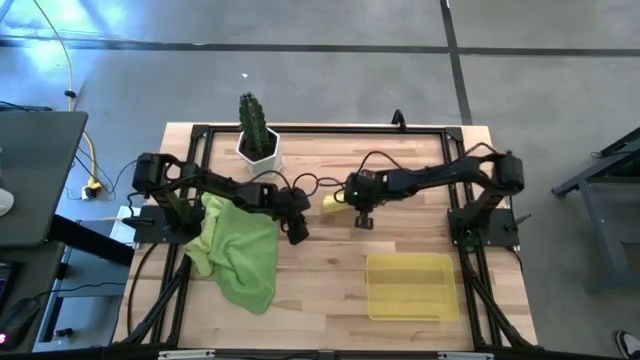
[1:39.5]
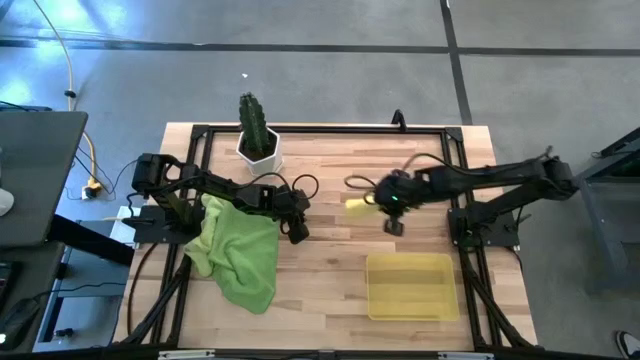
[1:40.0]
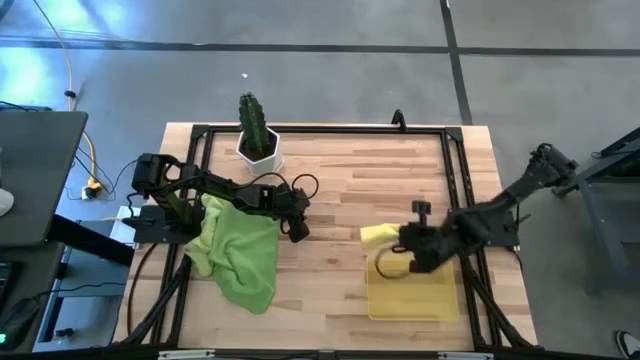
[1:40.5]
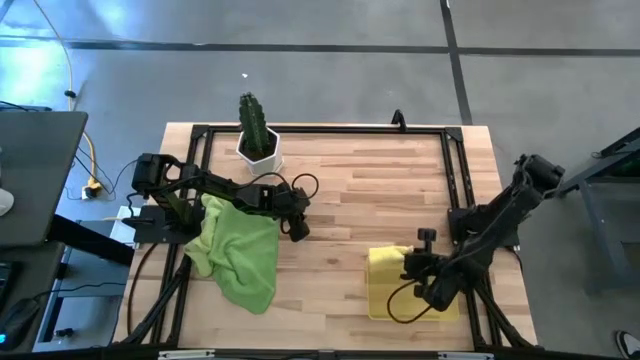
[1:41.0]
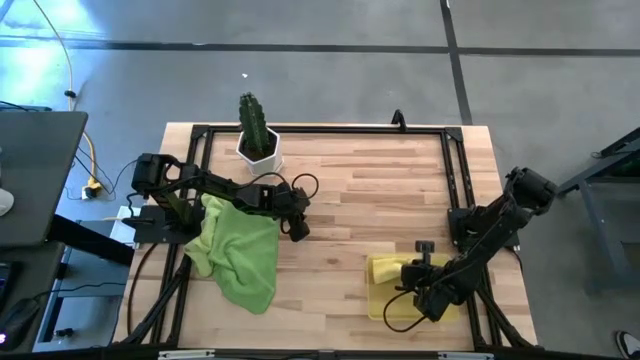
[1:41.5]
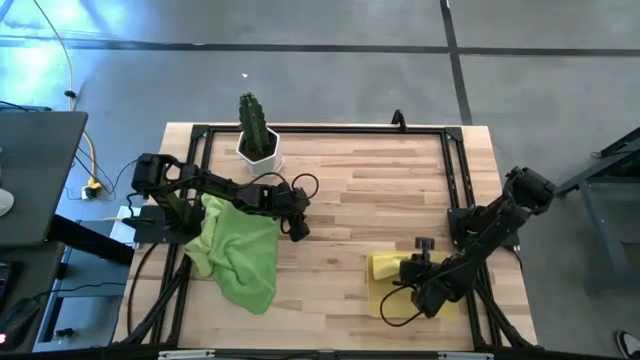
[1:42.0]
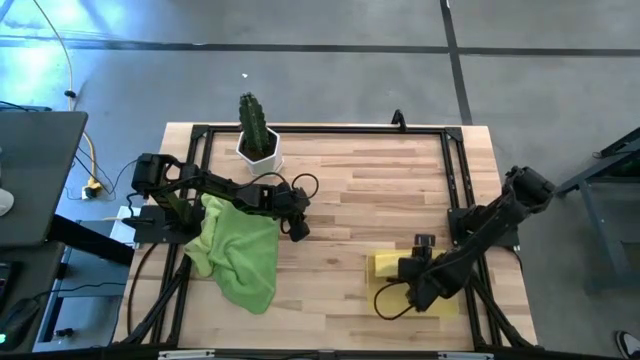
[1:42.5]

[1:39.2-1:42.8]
Task: Roll microfiber towels into tight, uniform cylinder then place into a basket
Put the rolled yellow towel into the yellow bin

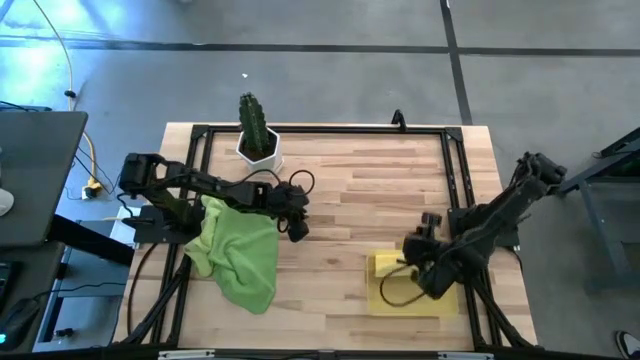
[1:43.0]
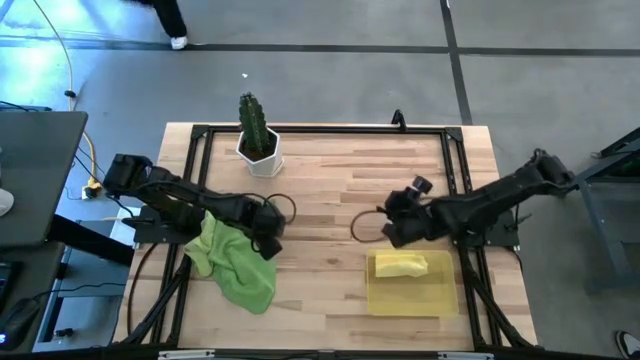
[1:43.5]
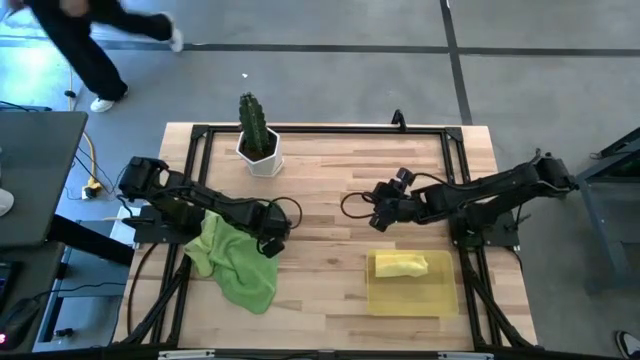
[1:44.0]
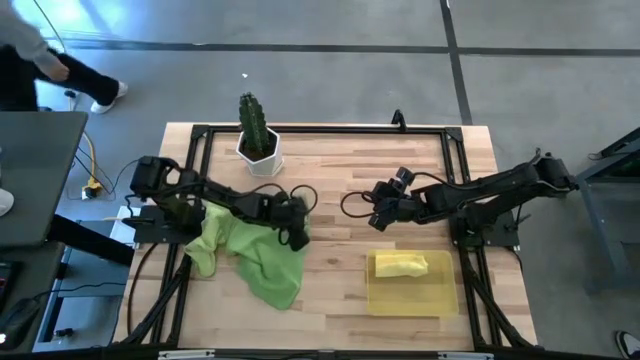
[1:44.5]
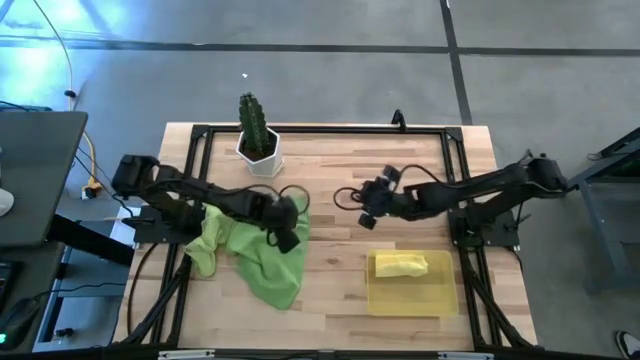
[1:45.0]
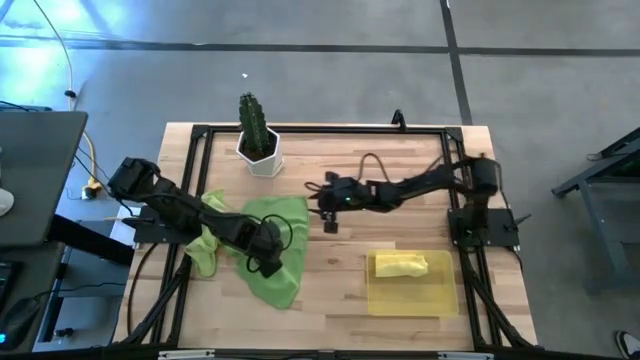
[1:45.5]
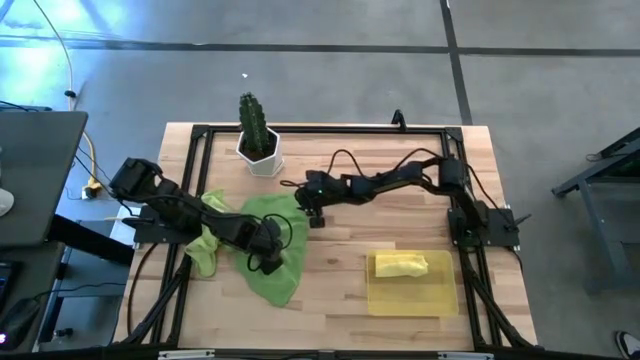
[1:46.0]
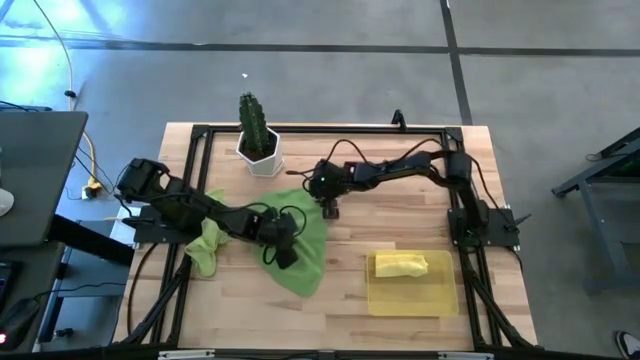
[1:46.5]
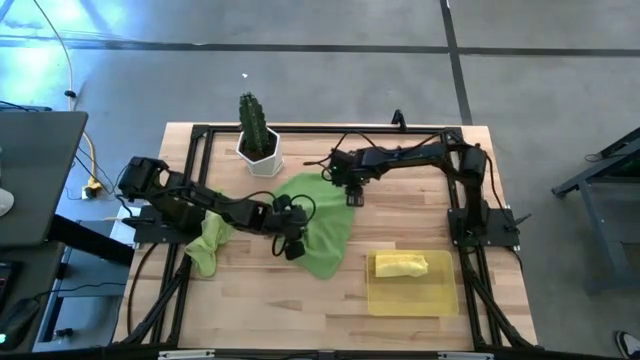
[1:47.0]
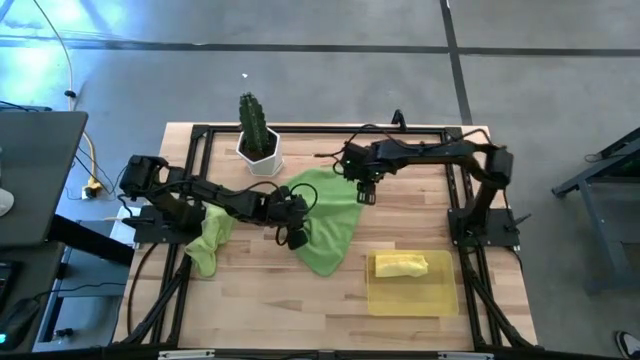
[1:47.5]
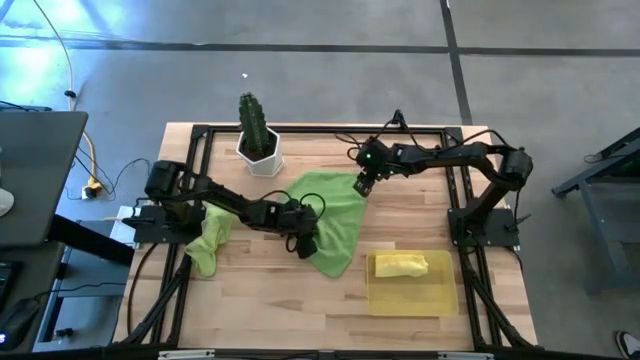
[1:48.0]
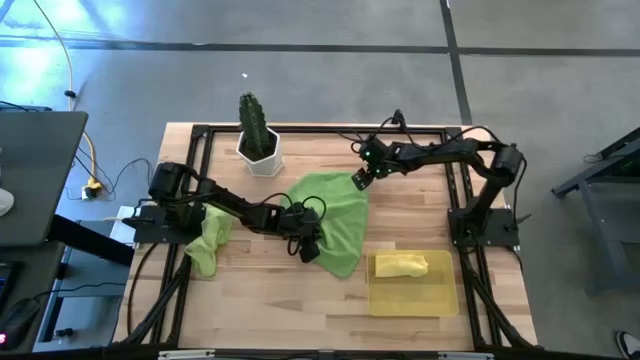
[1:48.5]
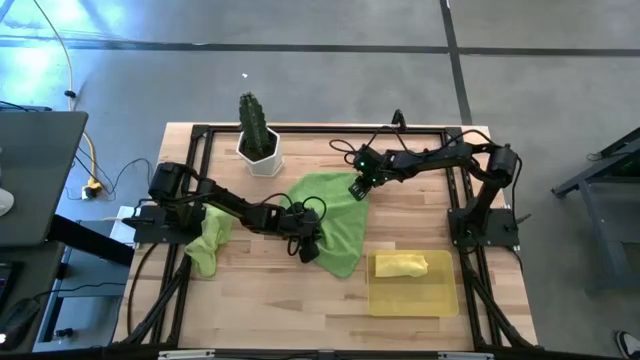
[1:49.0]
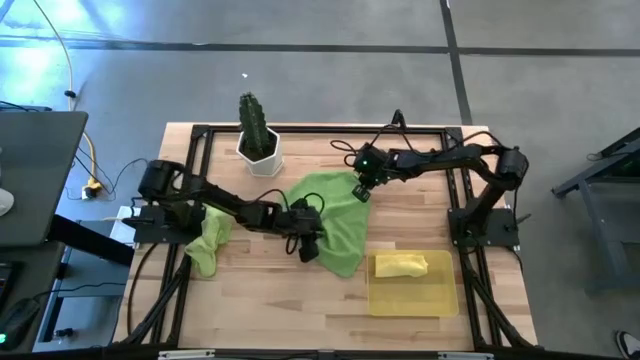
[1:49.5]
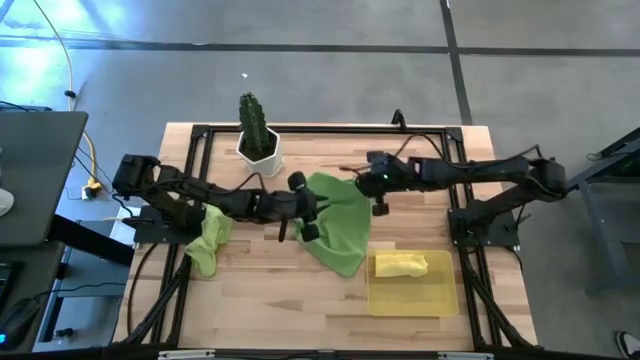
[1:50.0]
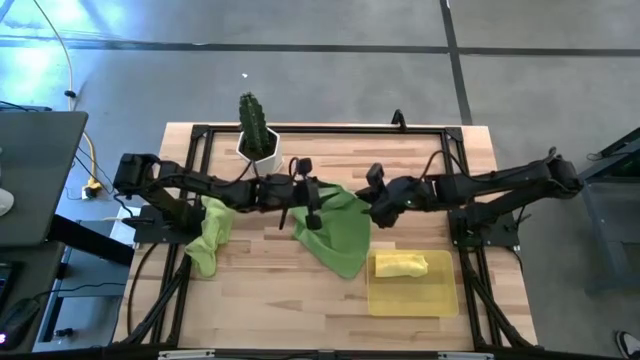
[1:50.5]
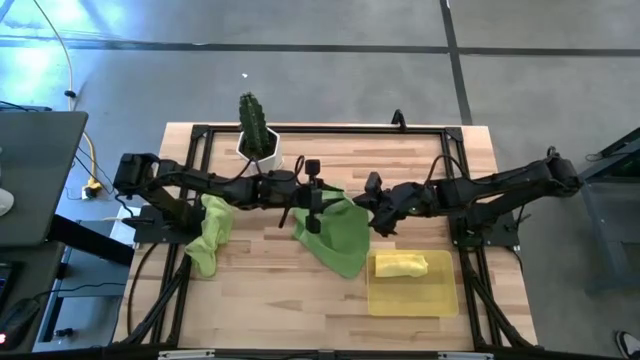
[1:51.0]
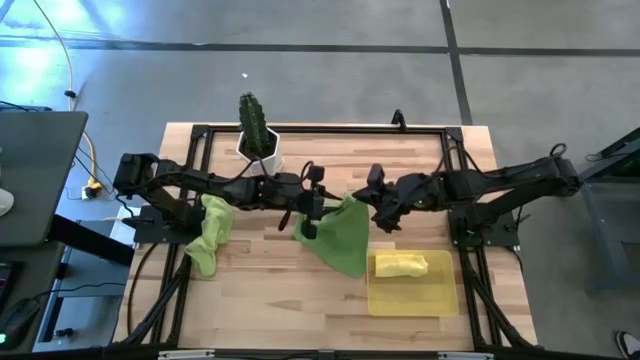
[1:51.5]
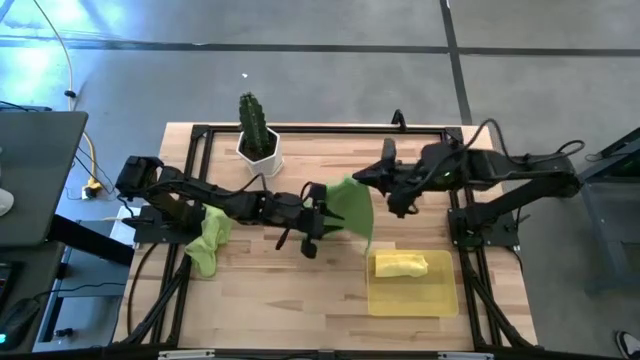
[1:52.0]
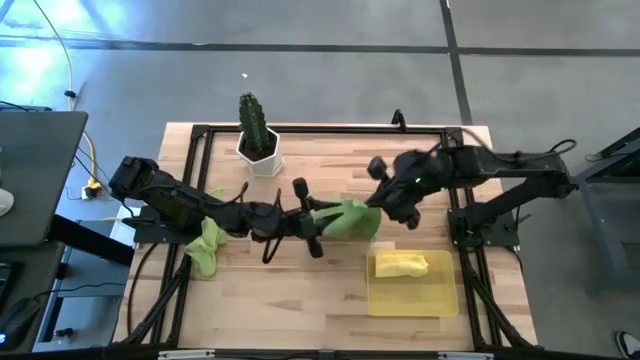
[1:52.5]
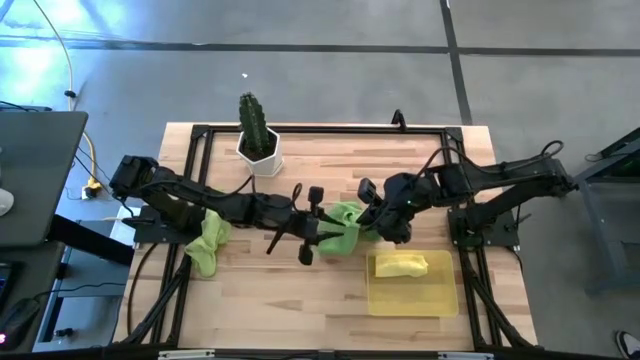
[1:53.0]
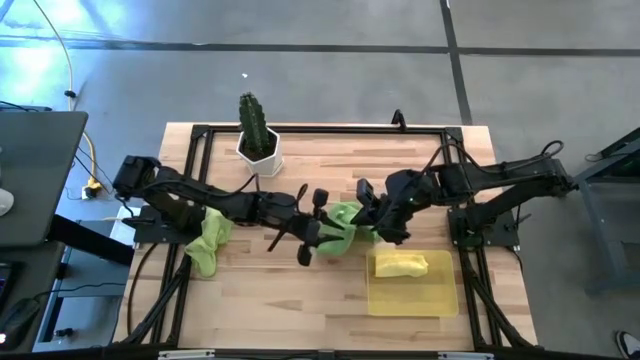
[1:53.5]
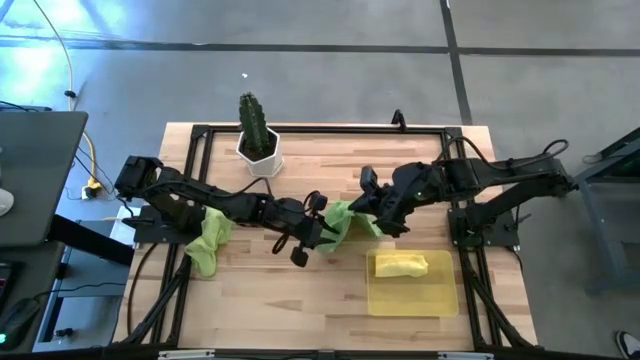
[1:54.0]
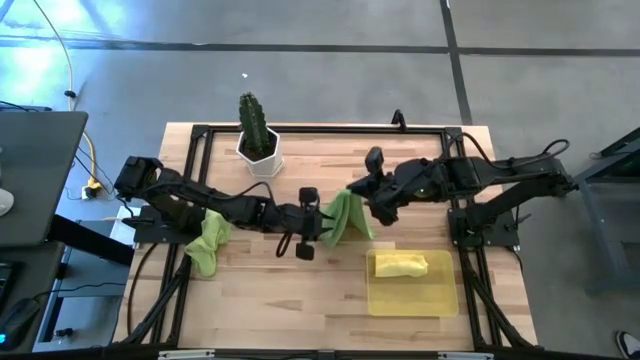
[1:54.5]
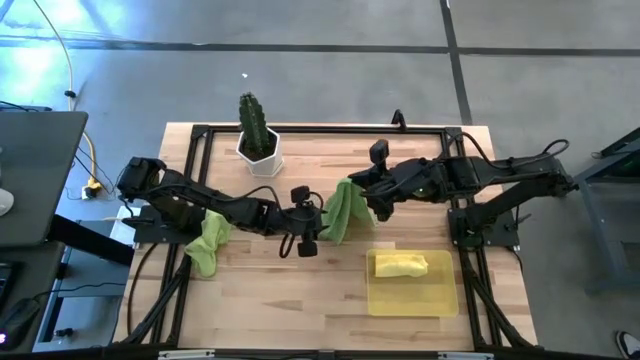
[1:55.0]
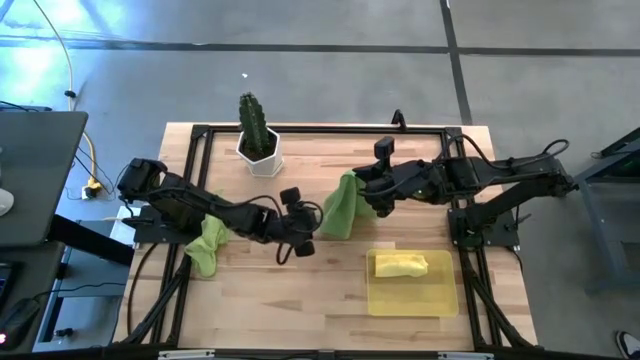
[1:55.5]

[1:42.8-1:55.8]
Fold the green towel

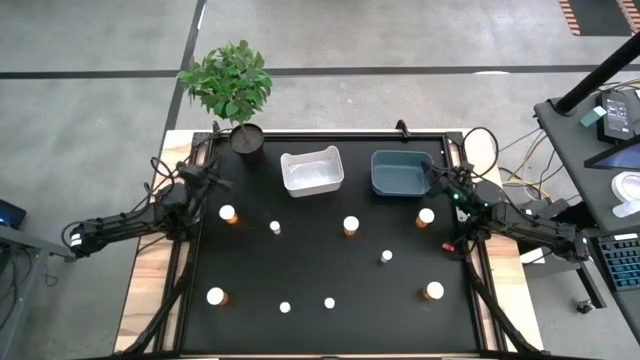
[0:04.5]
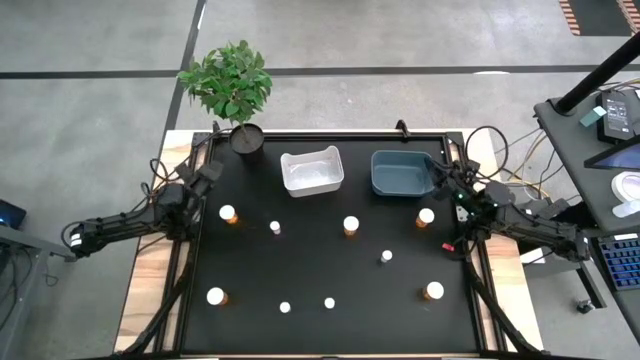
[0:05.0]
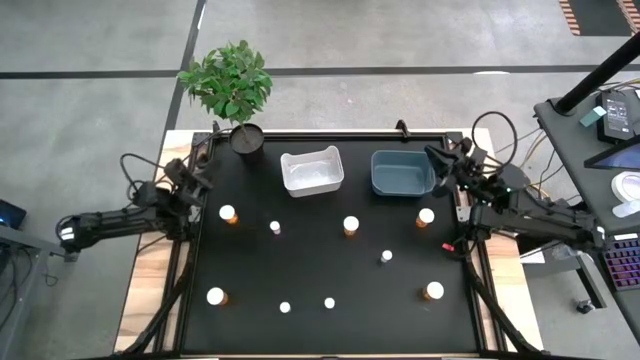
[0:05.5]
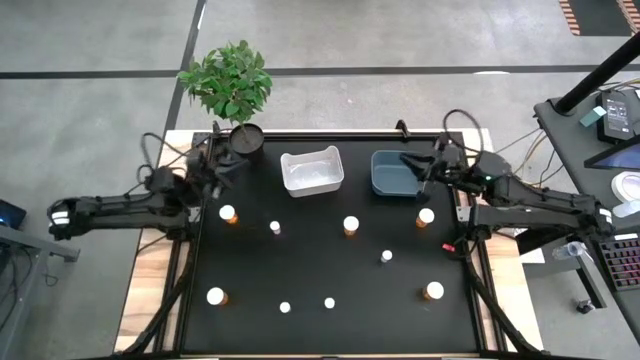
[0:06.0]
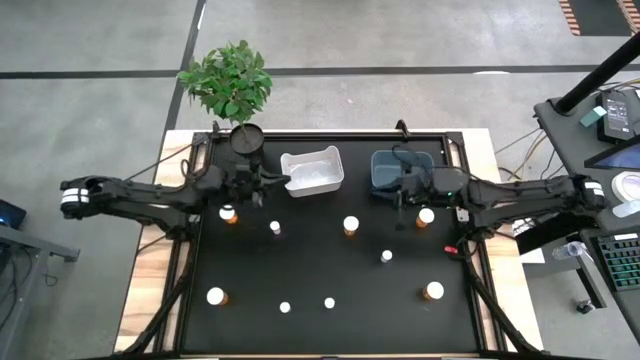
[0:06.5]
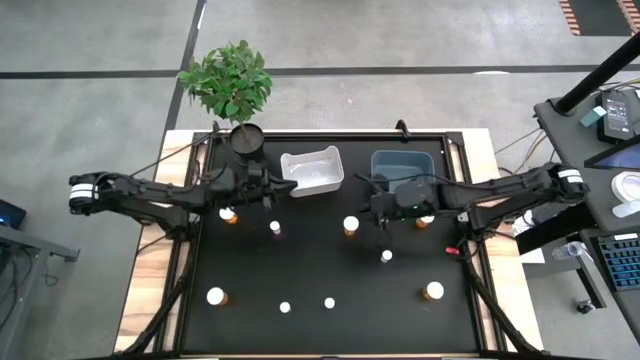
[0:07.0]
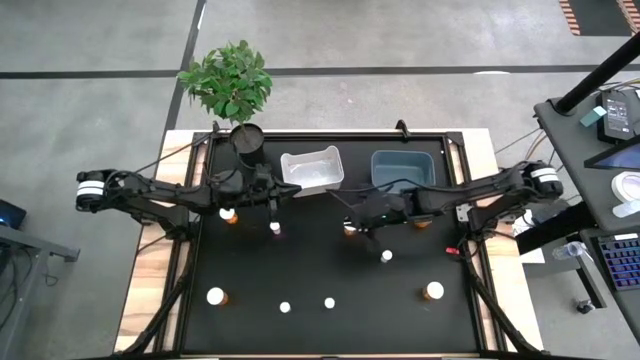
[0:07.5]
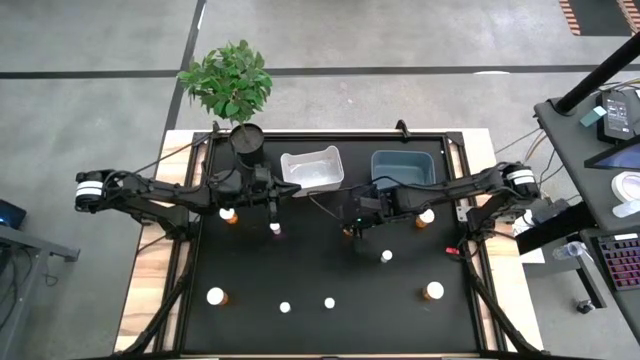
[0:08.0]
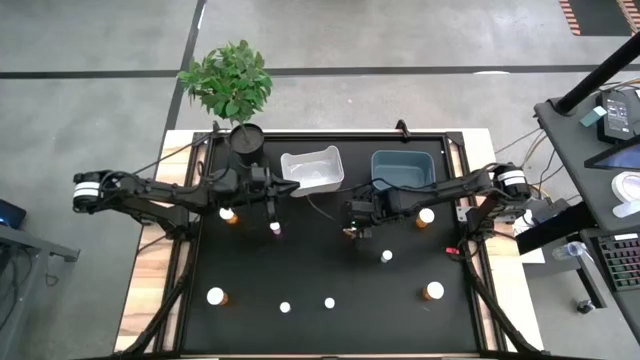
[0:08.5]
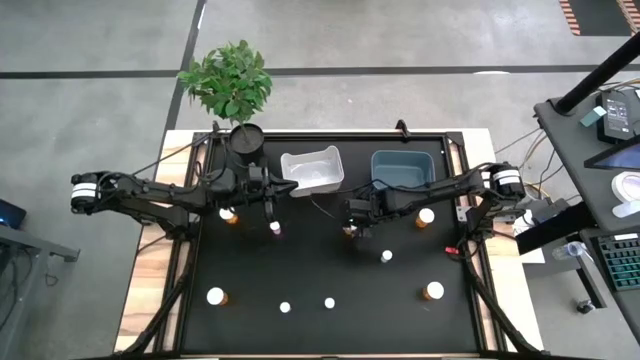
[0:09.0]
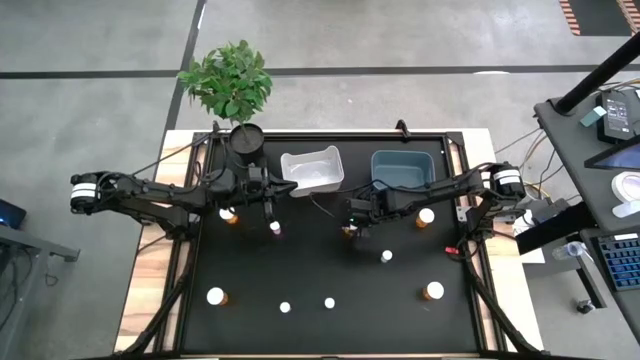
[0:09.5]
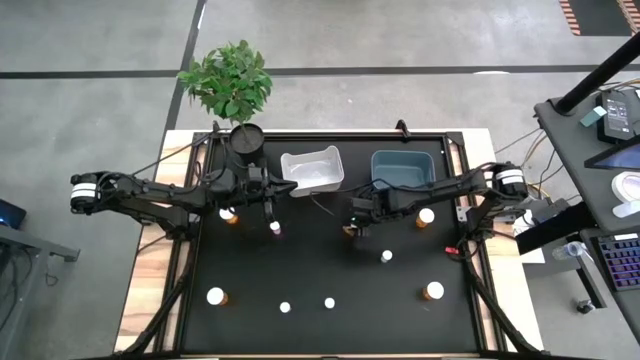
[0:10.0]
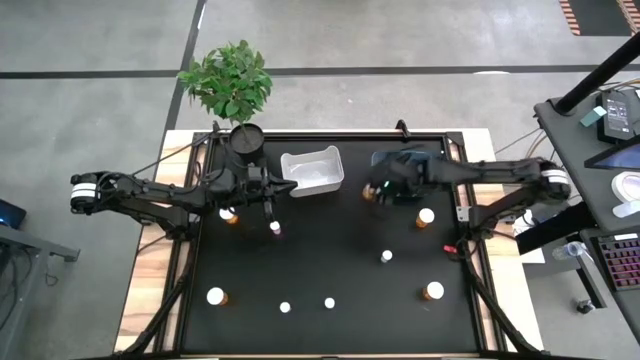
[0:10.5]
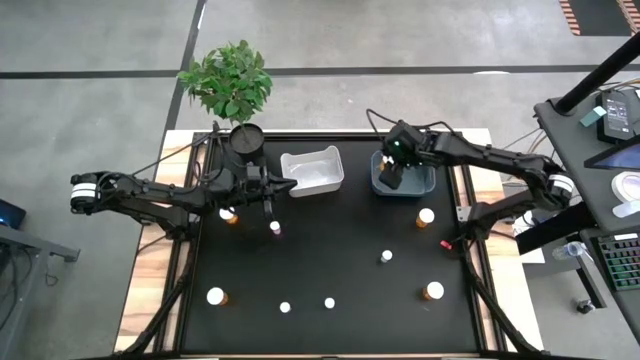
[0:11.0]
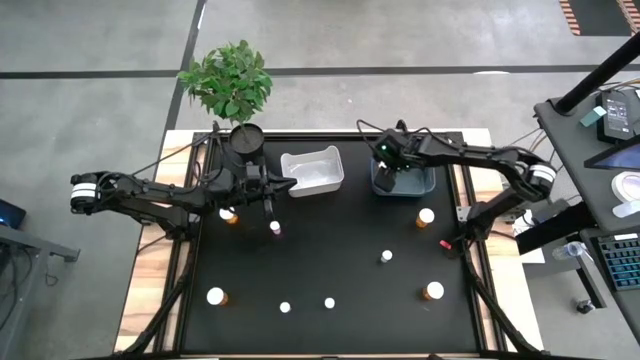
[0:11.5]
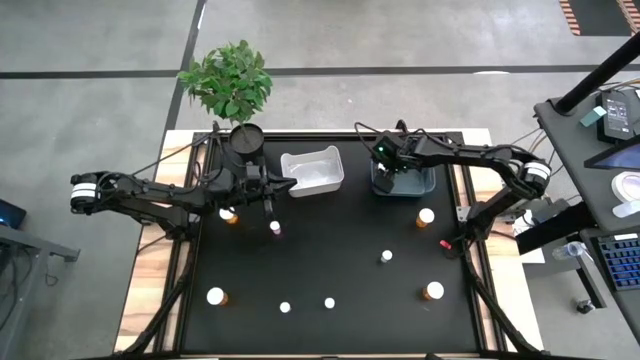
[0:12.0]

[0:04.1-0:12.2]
Task: Pick and place medicine bottles into bin by pill shape (circle, oval)
Put the orange capsule bottle into the blue bin
